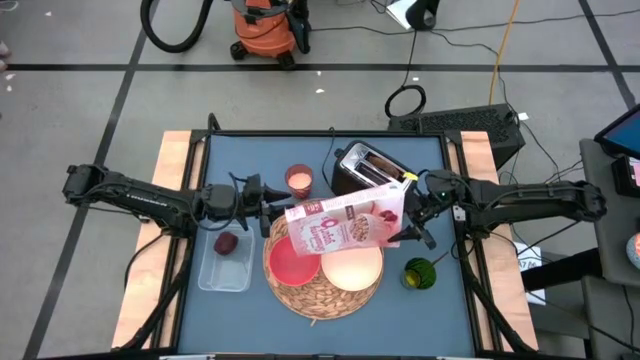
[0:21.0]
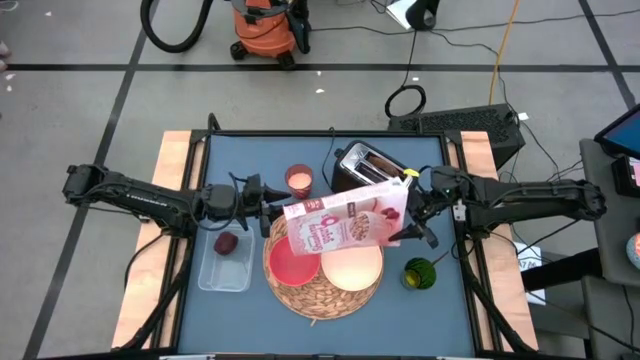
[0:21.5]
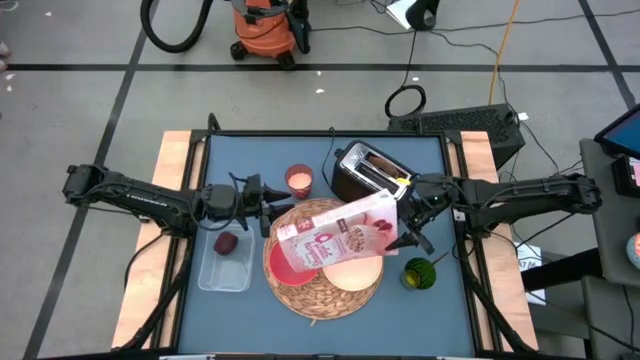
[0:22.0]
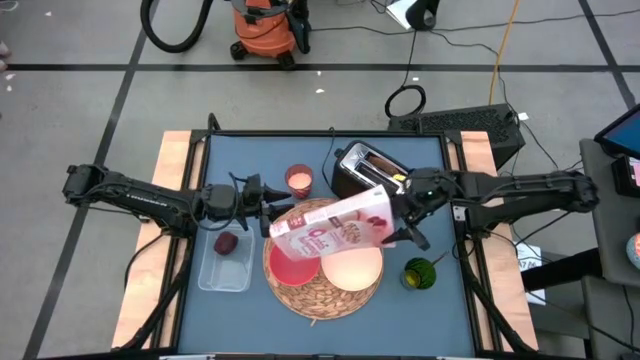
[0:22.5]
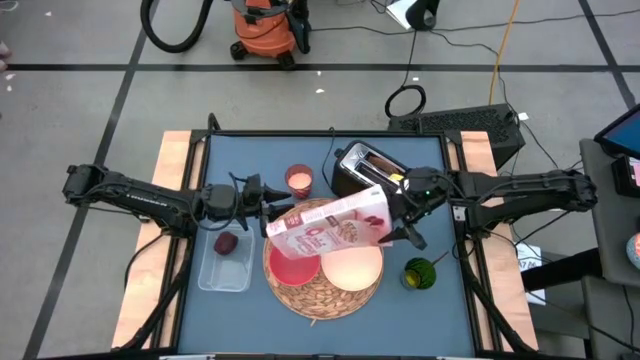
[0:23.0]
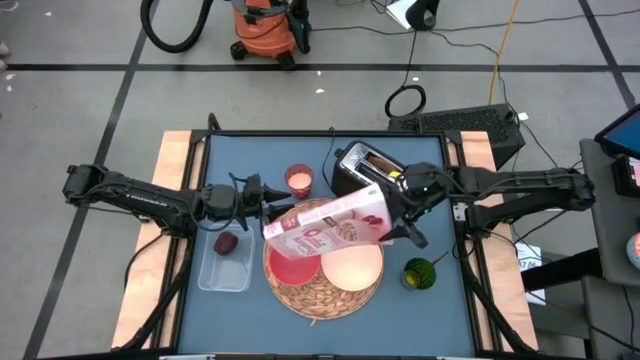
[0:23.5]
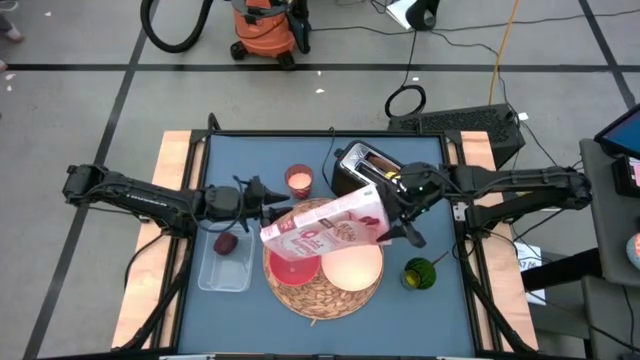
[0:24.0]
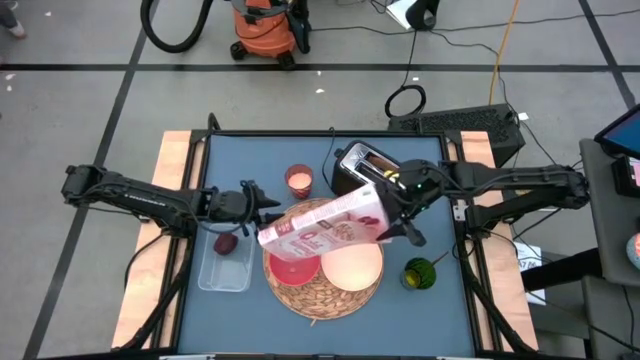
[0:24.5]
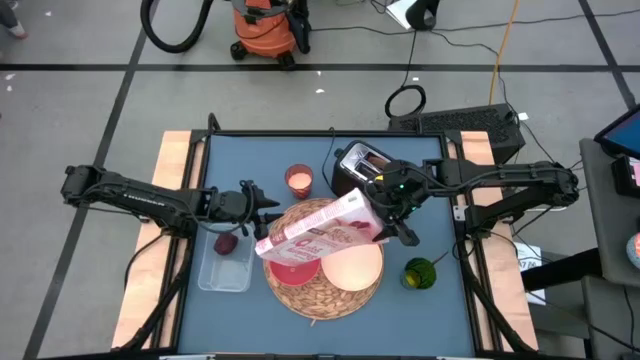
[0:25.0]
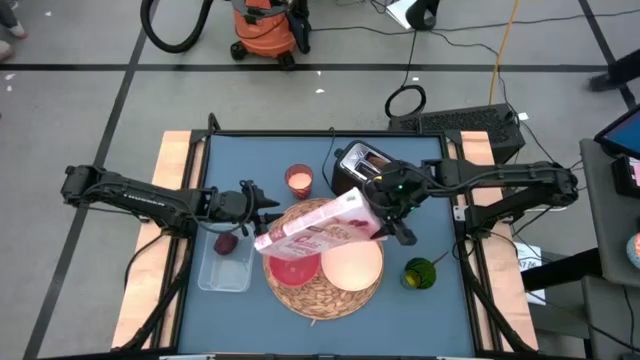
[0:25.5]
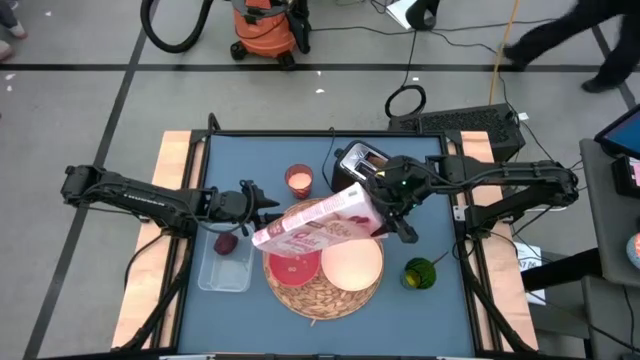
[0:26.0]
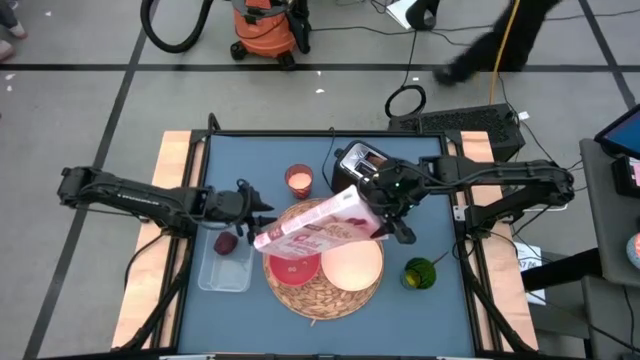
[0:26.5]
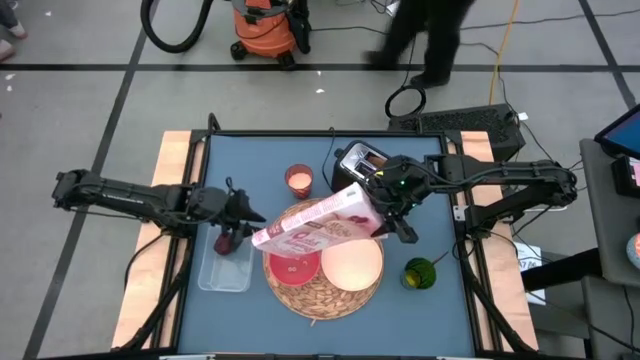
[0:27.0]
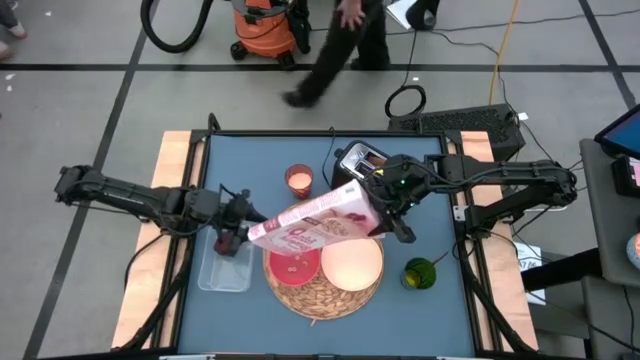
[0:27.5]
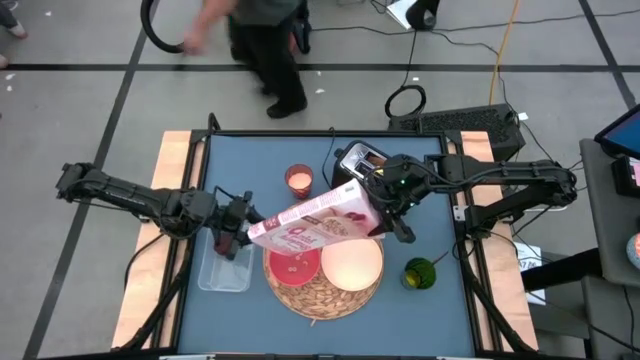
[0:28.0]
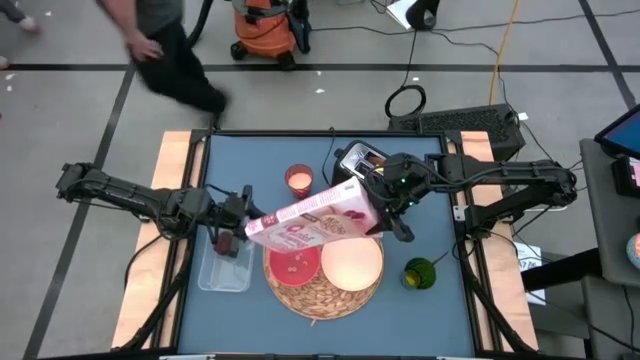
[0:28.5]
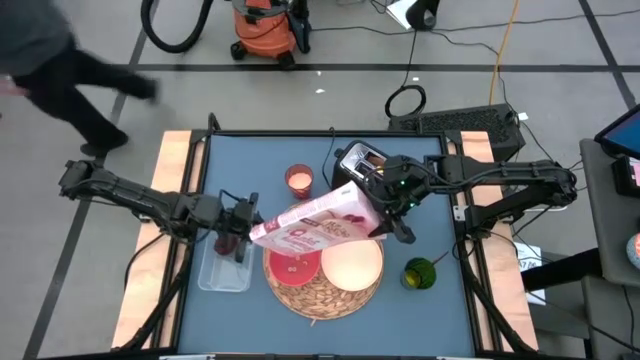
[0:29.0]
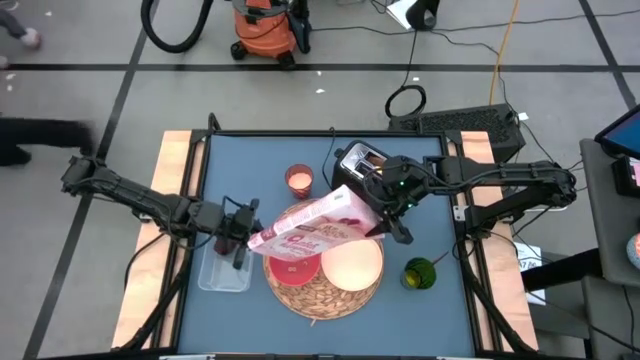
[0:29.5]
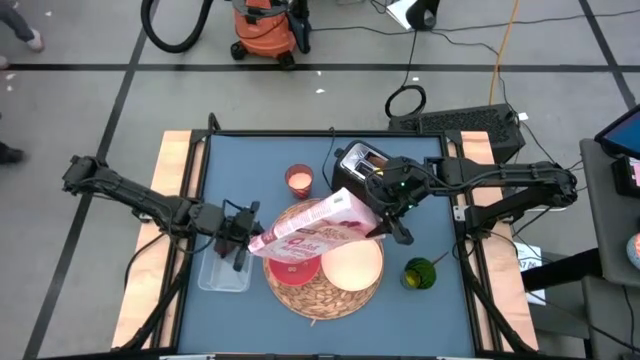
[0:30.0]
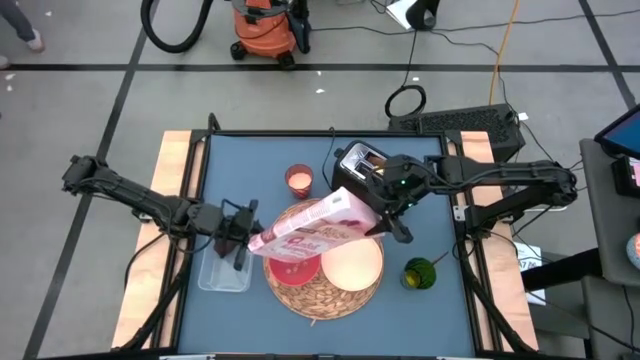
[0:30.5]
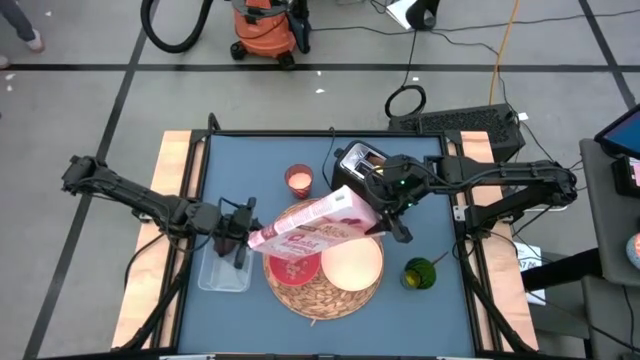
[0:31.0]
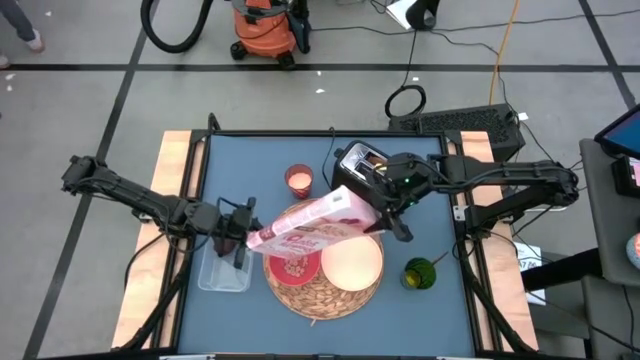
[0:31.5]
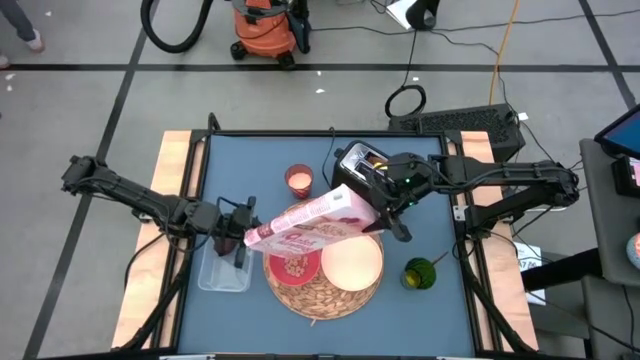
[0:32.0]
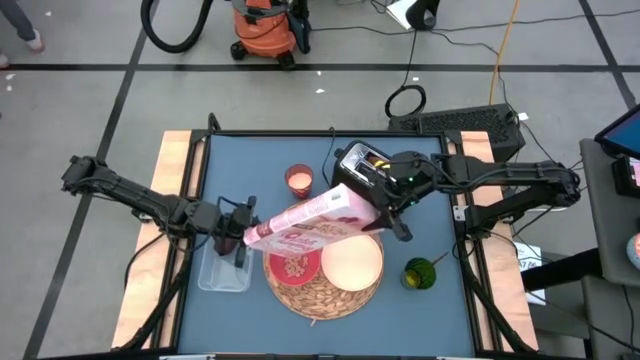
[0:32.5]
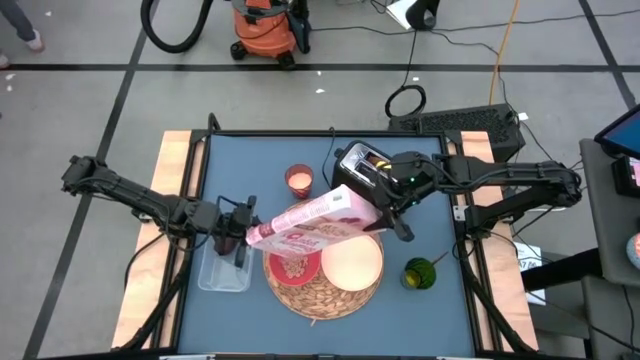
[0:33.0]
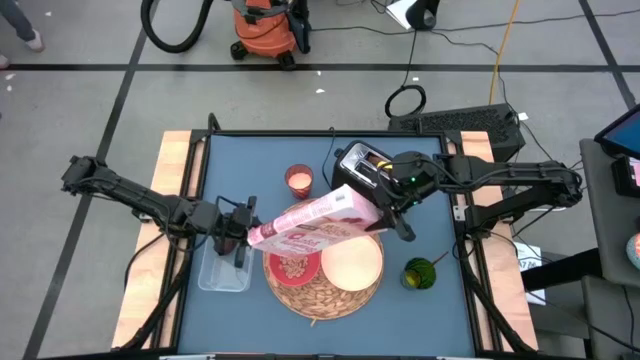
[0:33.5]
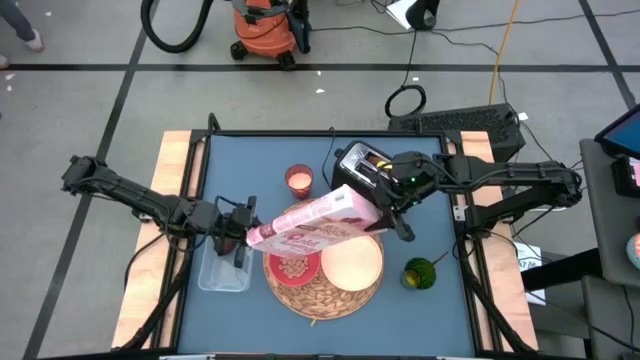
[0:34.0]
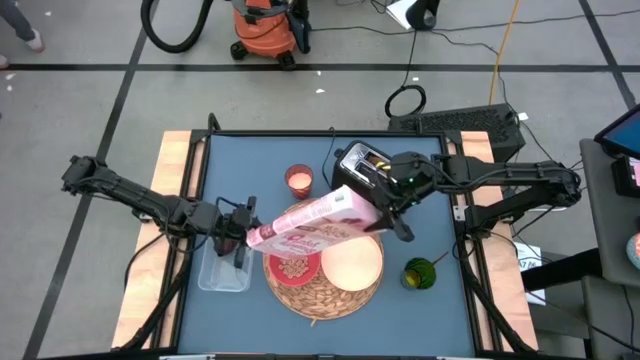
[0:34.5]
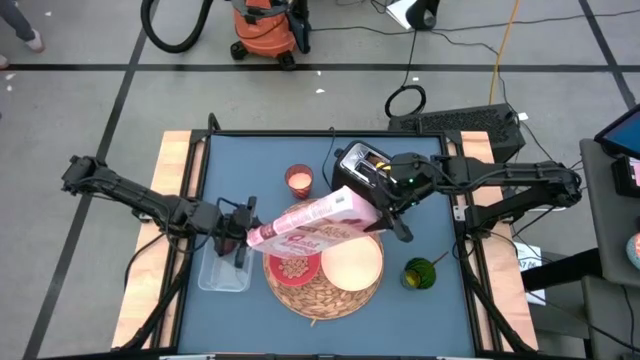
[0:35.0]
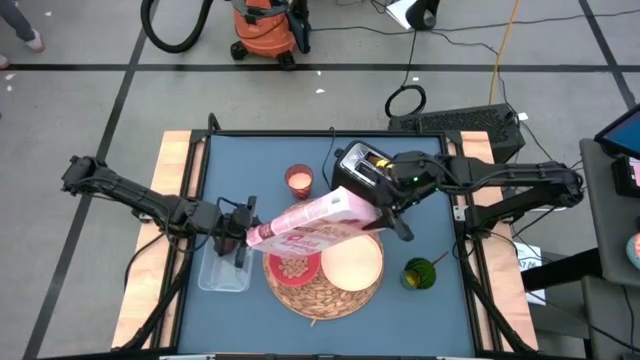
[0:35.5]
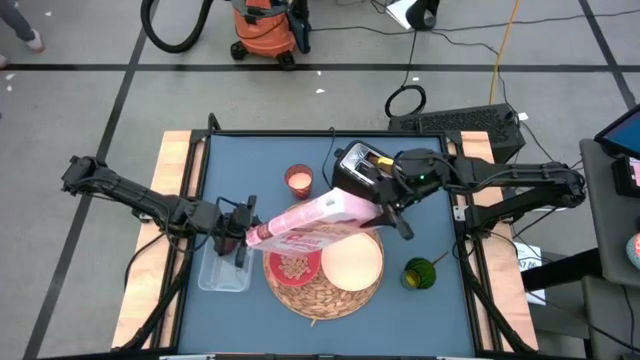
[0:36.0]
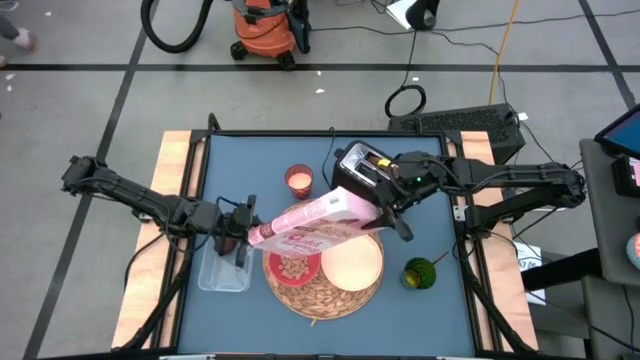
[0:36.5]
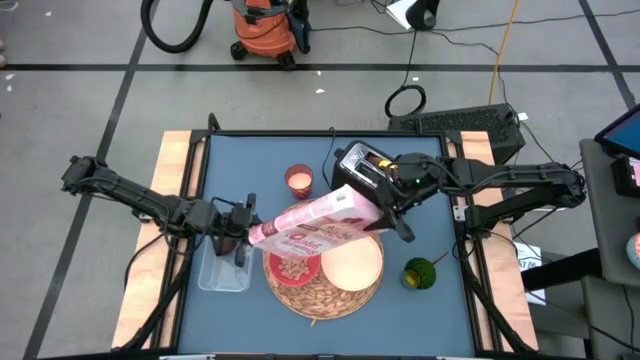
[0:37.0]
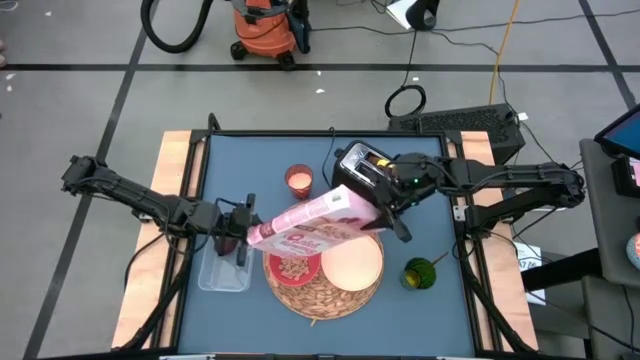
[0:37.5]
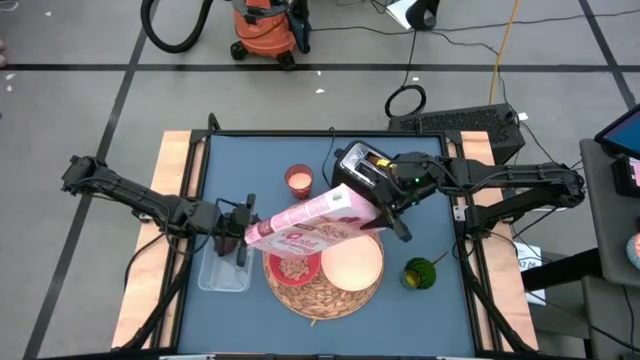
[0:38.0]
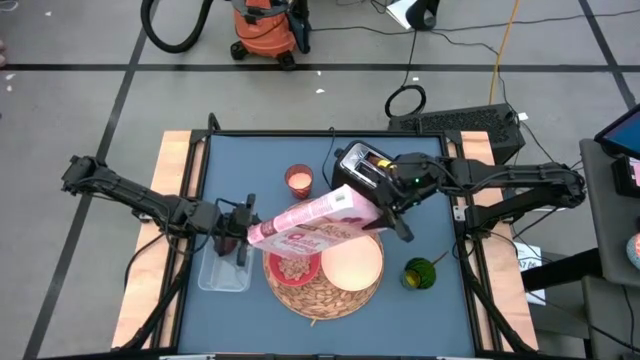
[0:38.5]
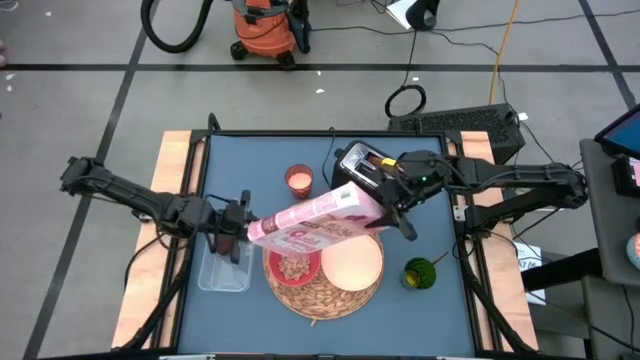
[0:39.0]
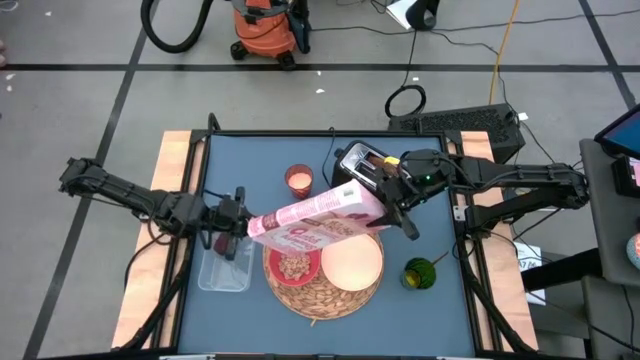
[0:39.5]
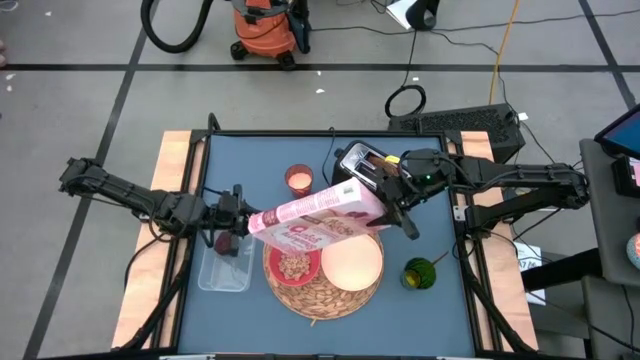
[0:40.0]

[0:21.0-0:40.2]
Task: Arrange a breakfast setting
Pour the cereal from the cereal box into the orange bowl
